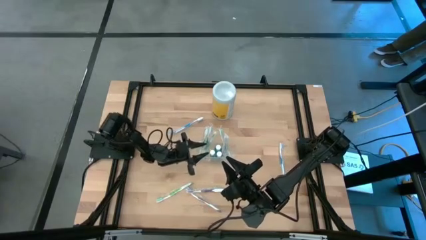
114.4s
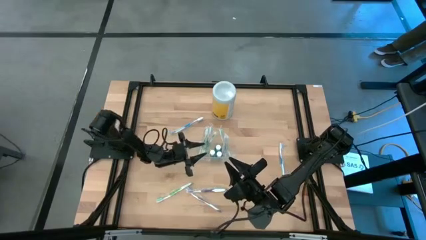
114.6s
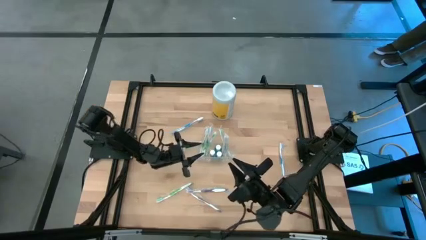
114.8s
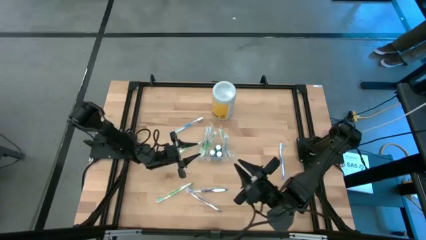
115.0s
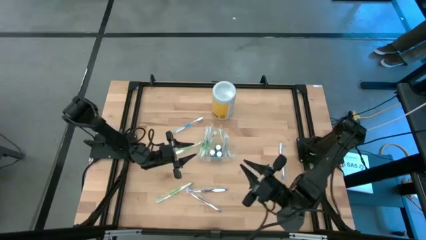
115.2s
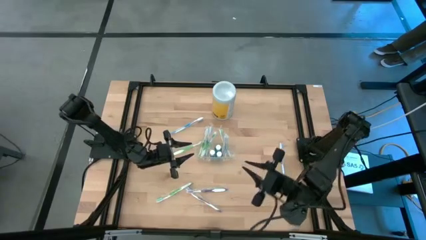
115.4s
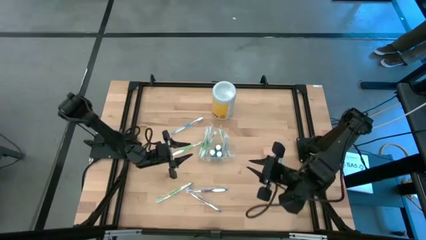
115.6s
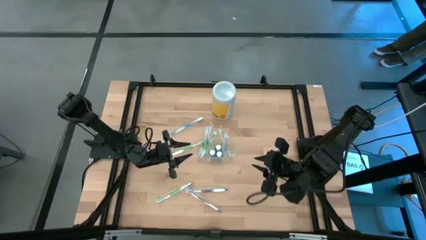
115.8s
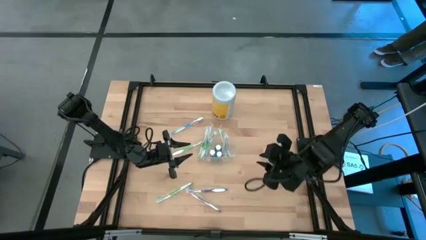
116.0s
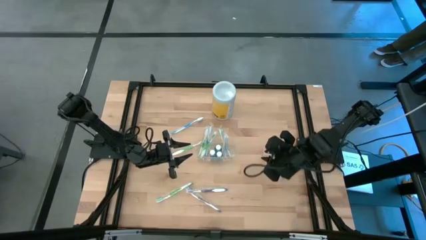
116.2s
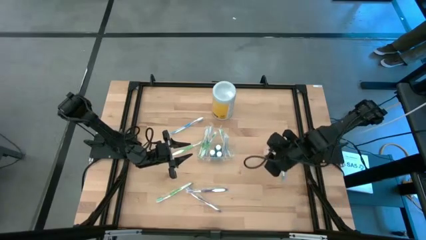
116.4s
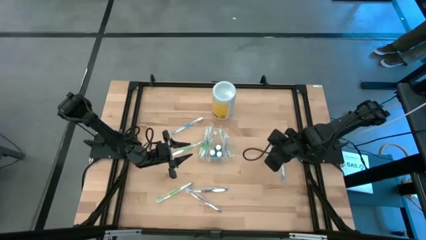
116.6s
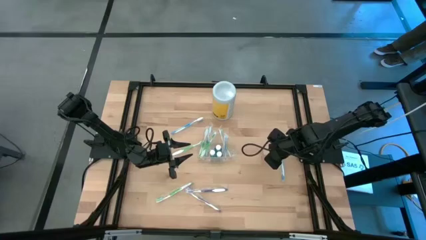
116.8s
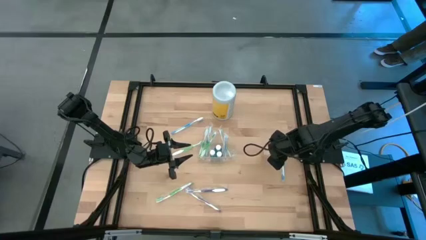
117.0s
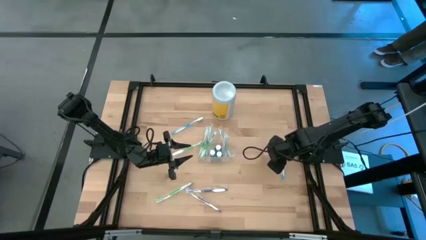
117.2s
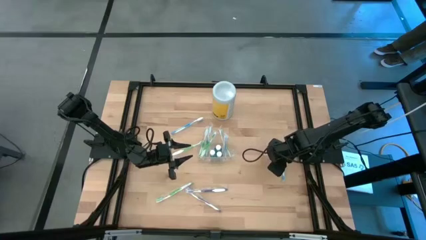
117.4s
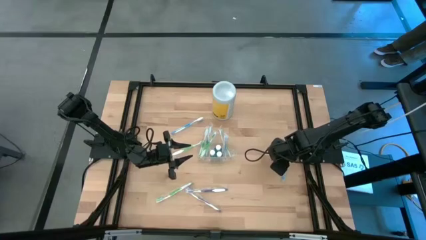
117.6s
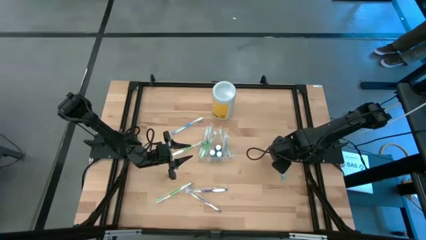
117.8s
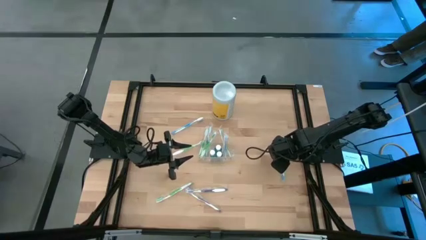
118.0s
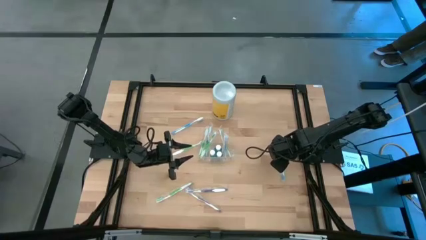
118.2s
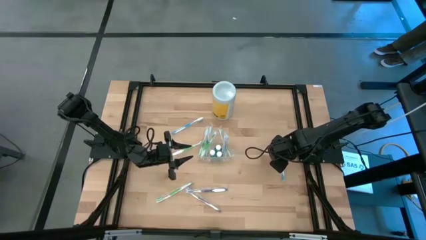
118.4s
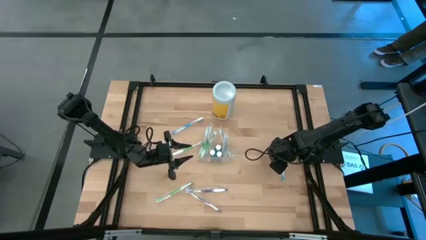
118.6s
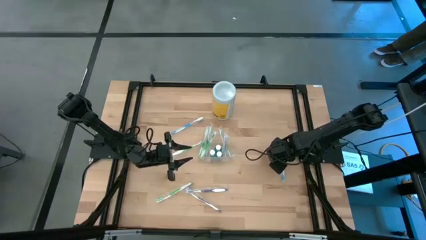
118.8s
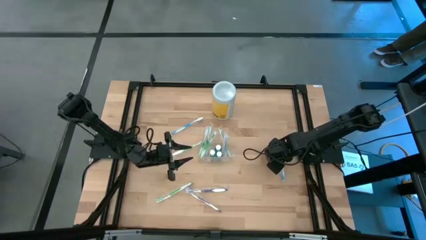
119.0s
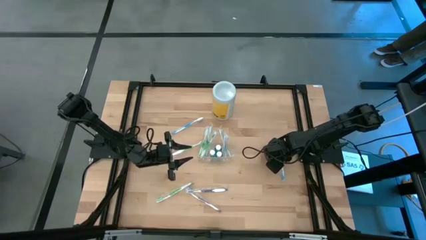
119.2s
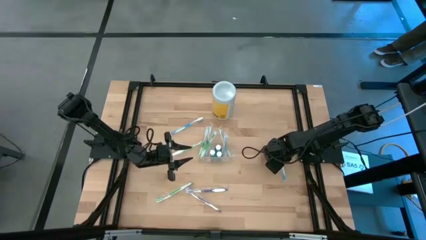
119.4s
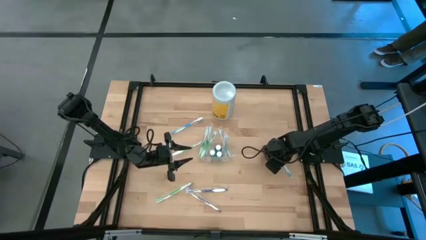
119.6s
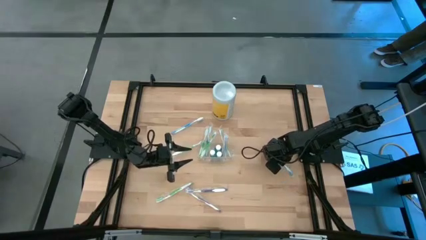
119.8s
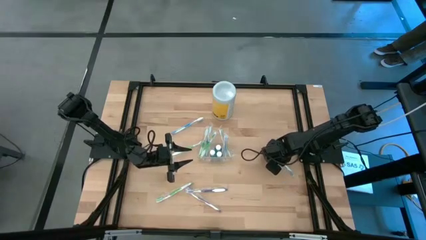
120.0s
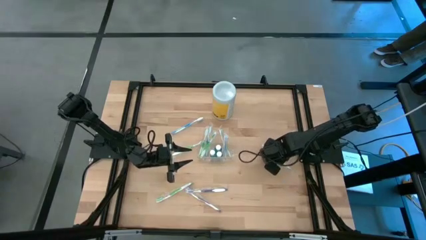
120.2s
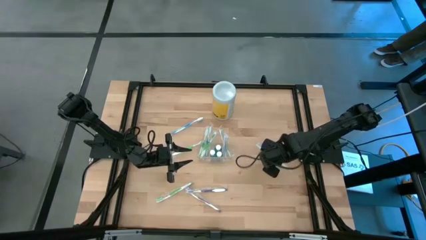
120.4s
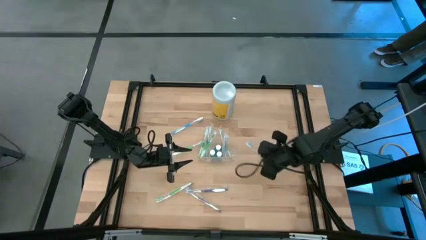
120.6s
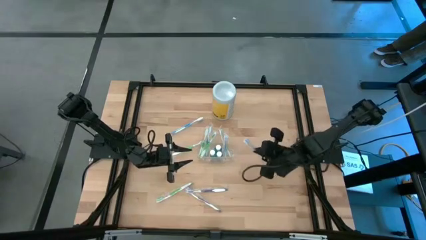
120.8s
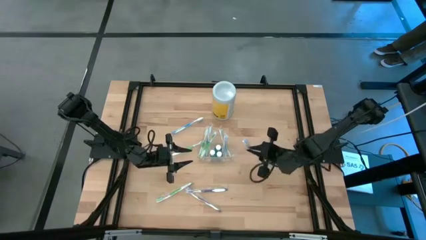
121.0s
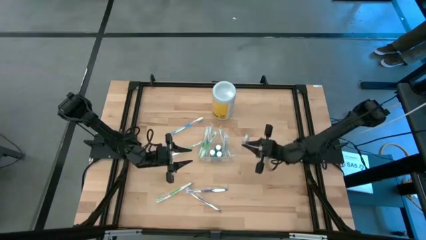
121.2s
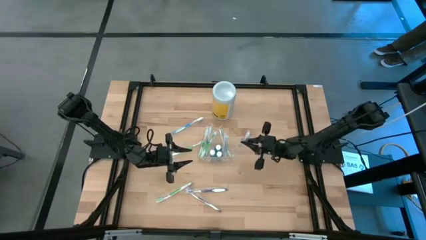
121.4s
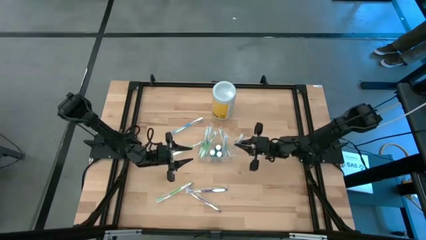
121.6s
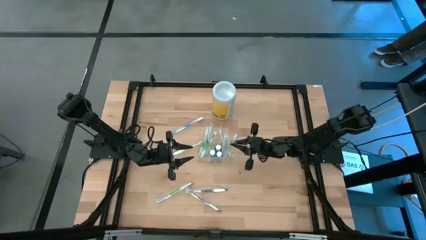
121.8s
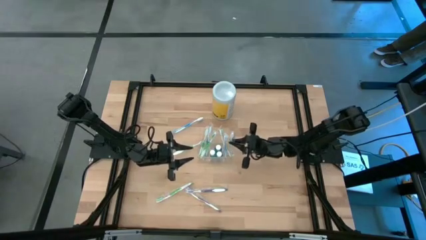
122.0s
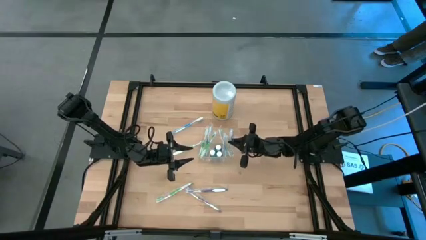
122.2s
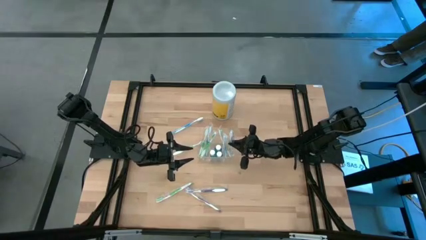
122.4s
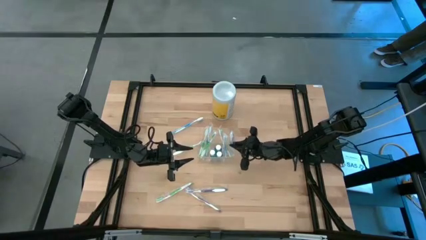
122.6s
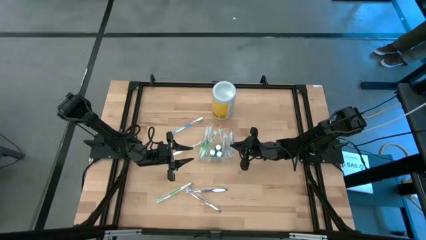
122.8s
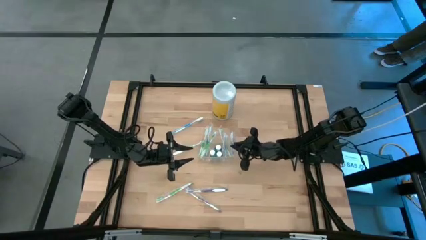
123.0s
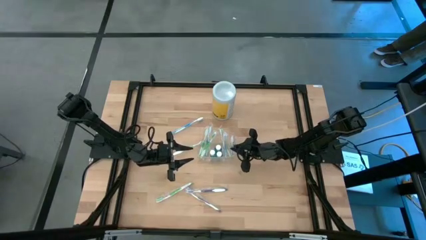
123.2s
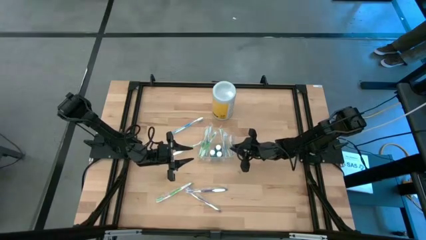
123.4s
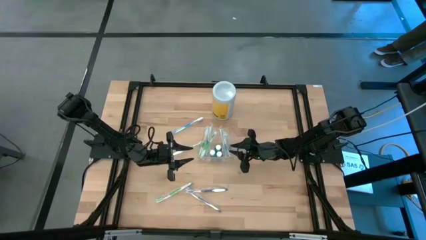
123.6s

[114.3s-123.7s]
Task: Pick & Place toothbrushing station
Put the blue toothbrush into the transparent organizer

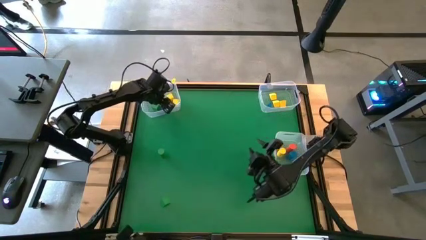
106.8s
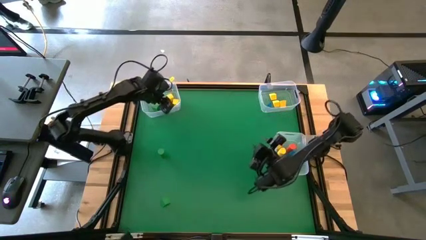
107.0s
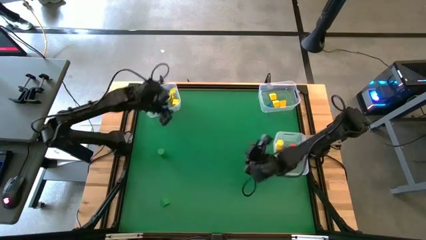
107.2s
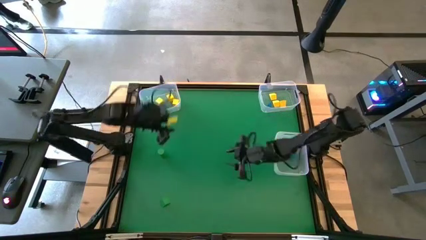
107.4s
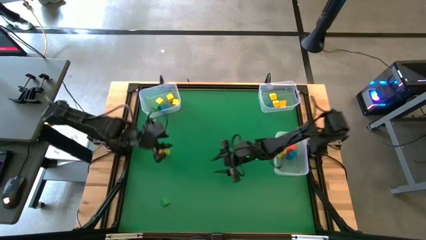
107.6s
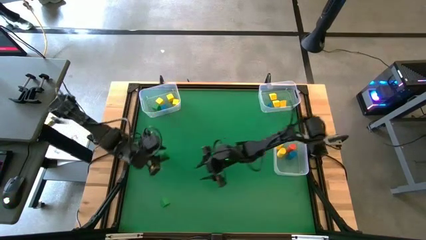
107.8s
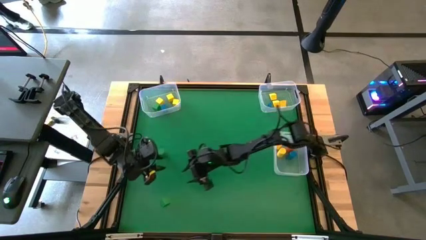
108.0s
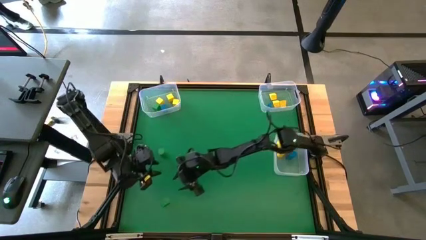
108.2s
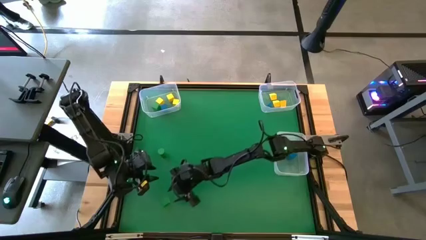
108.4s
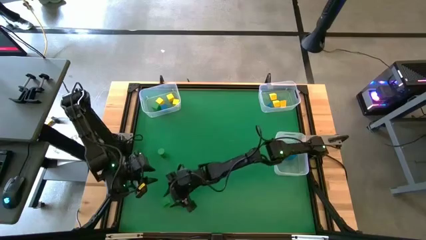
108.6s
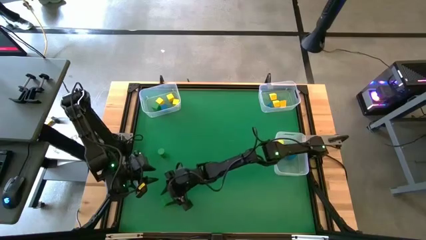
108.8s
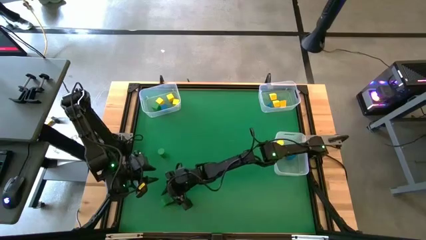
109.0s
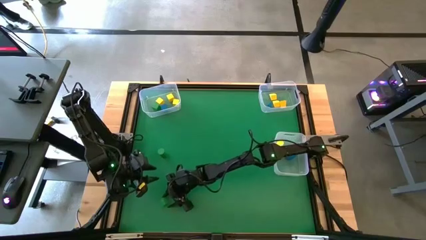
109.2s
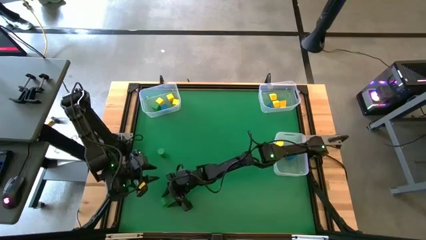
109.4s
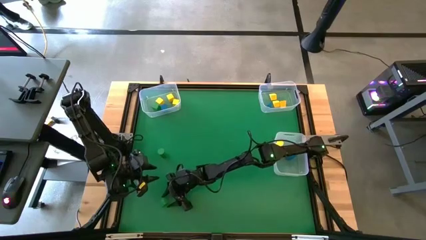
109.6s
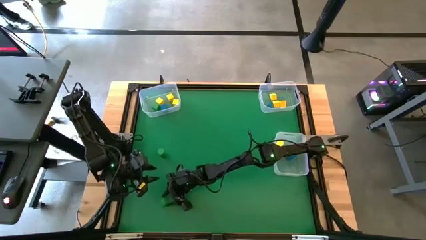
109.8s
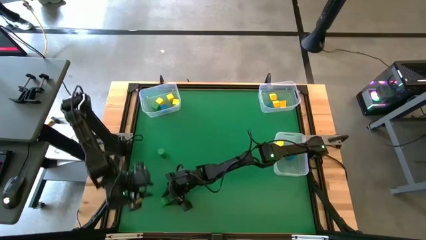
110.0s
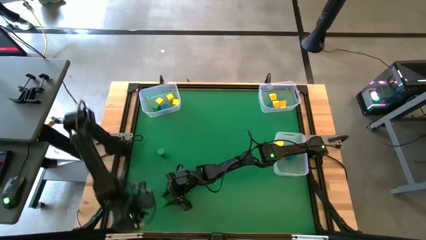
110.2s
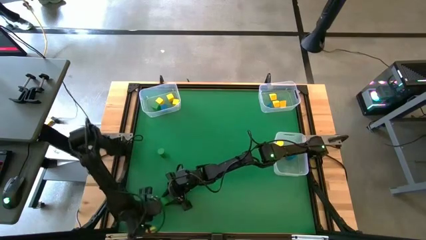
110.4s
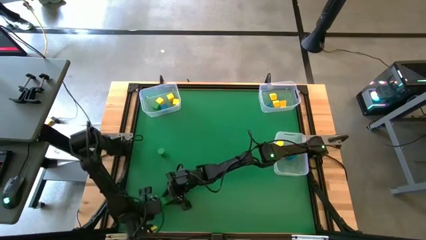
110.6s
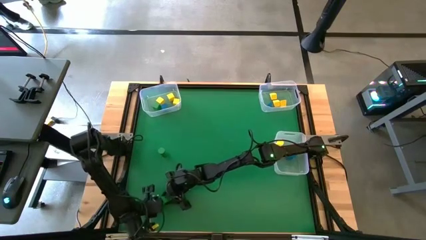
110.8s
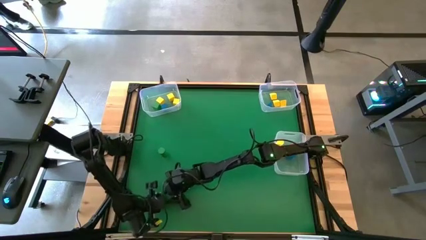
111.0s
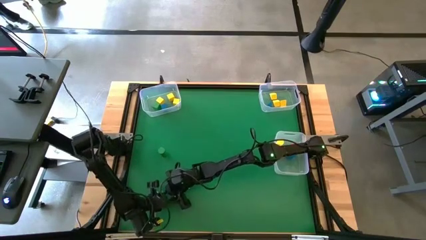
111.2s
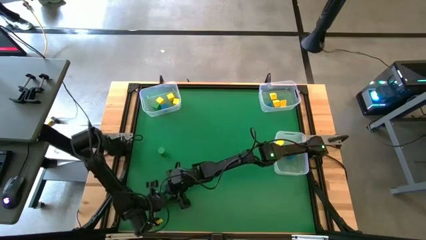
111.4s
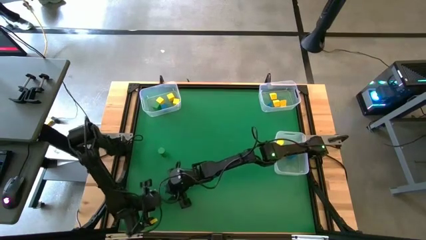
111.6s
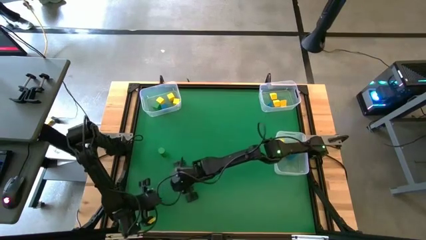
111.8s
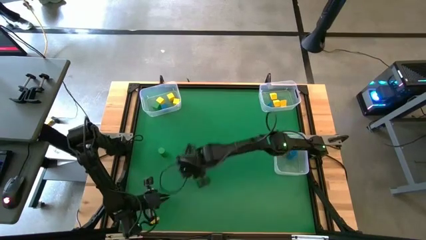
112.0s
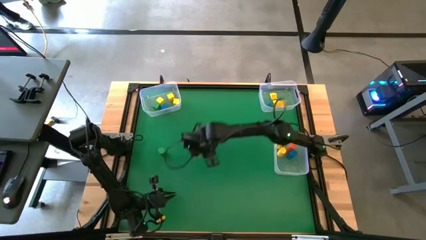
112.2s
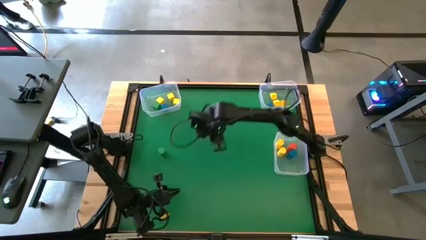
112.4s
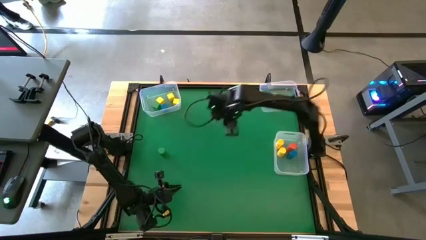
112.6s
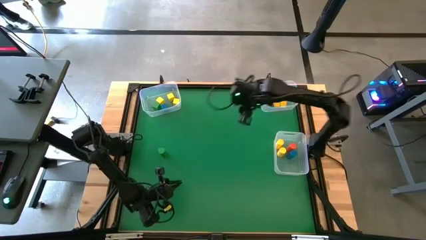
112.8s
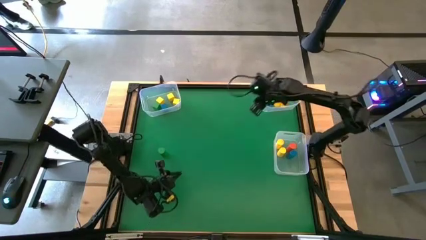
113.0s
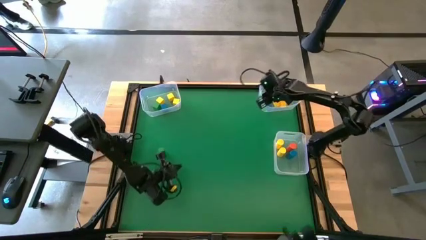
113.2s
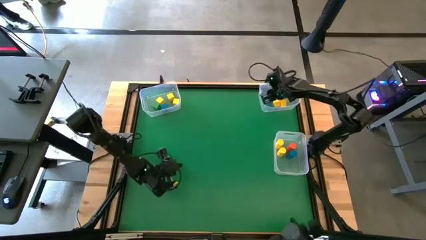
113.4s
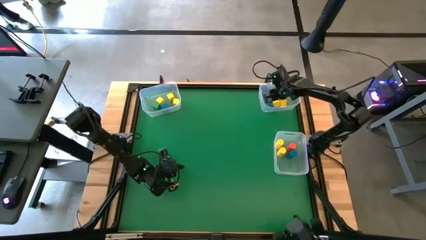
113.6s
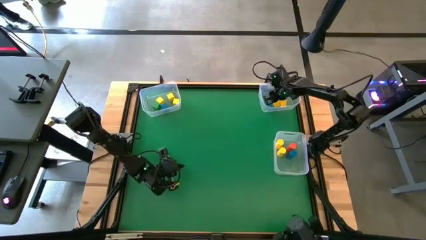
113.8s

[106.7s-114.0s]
Task: Sort blocks by size
Put the green triangular block into the top right transparent bin
